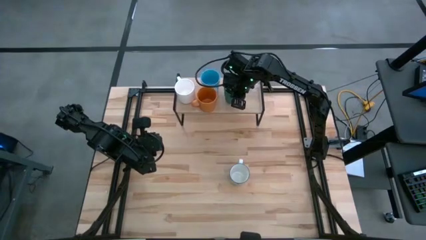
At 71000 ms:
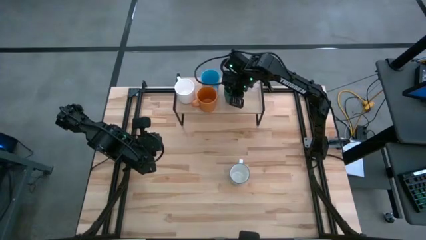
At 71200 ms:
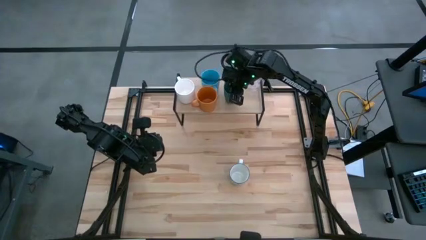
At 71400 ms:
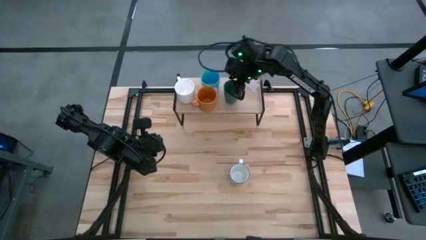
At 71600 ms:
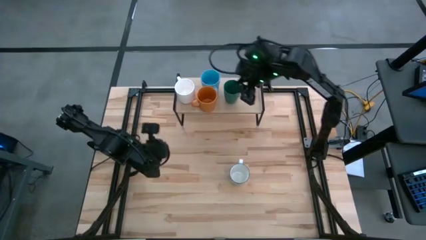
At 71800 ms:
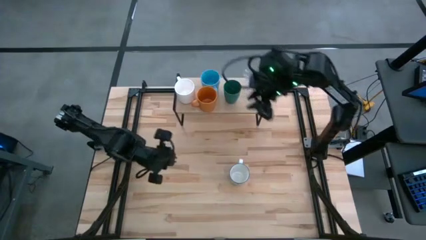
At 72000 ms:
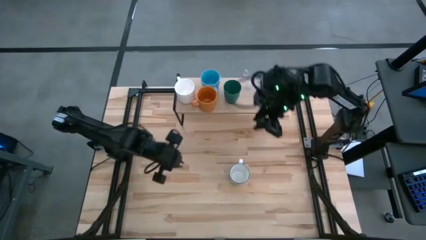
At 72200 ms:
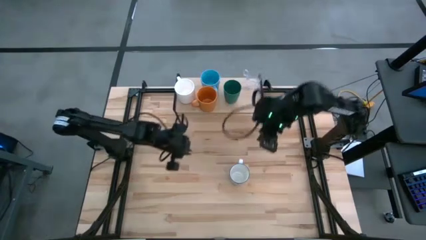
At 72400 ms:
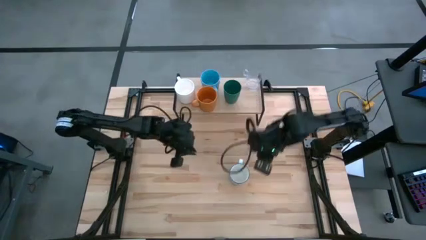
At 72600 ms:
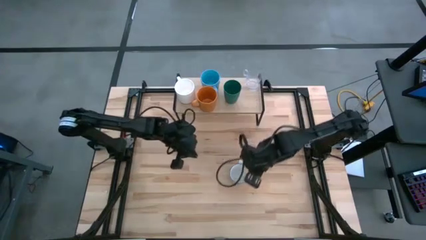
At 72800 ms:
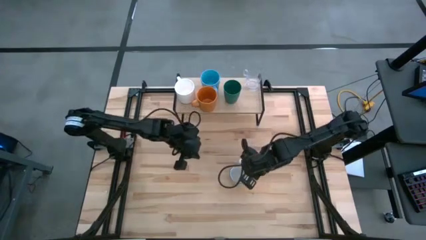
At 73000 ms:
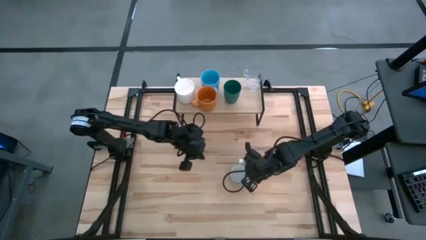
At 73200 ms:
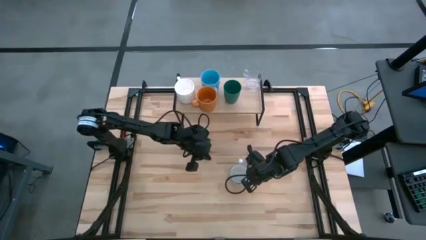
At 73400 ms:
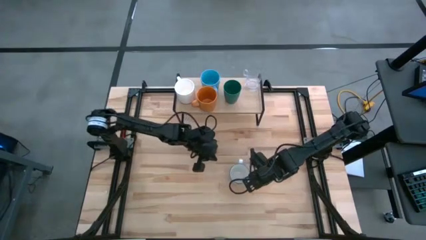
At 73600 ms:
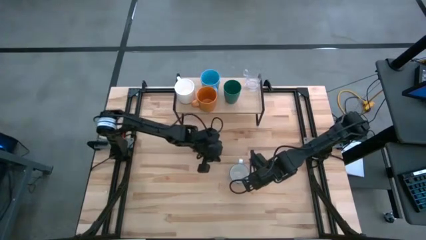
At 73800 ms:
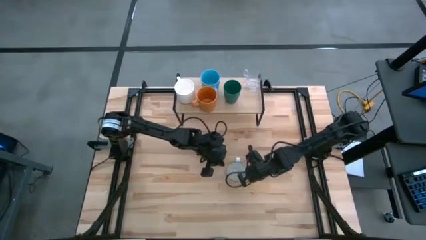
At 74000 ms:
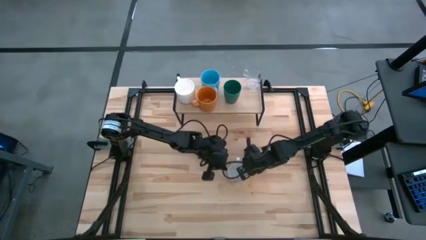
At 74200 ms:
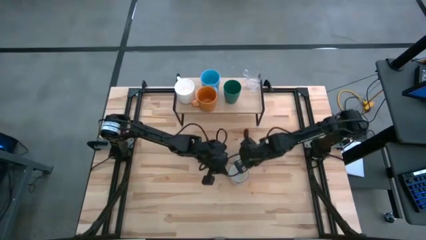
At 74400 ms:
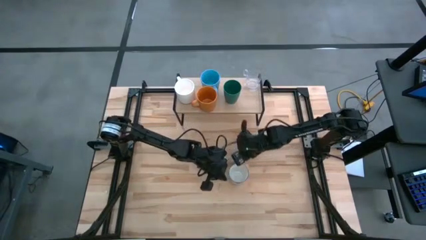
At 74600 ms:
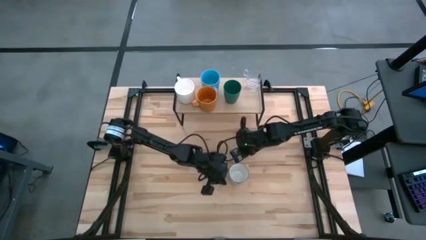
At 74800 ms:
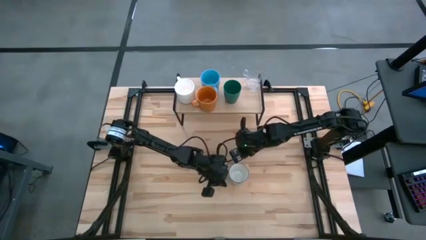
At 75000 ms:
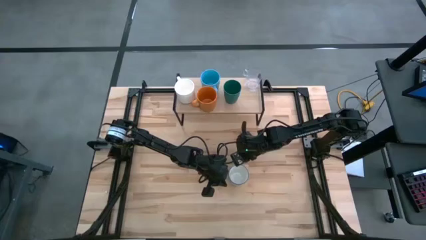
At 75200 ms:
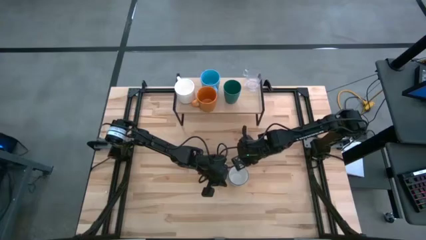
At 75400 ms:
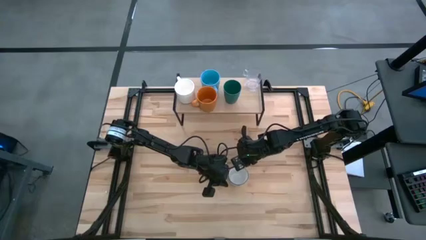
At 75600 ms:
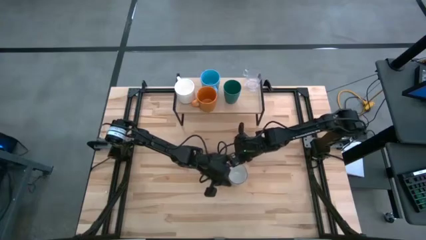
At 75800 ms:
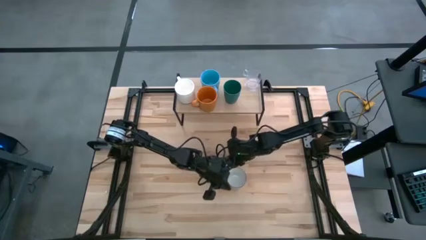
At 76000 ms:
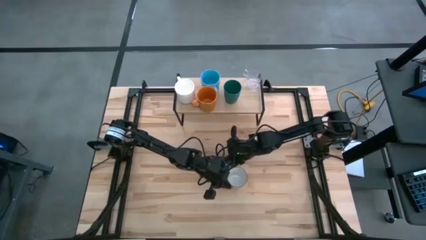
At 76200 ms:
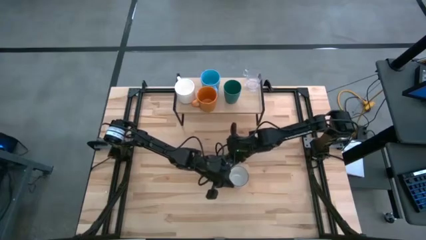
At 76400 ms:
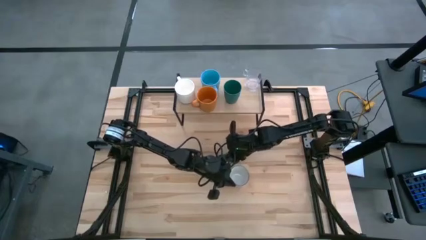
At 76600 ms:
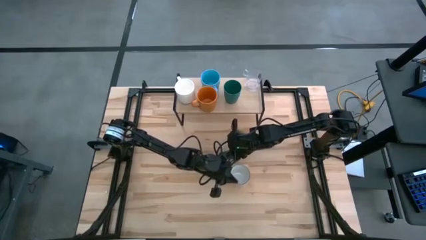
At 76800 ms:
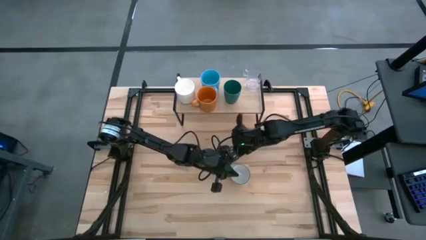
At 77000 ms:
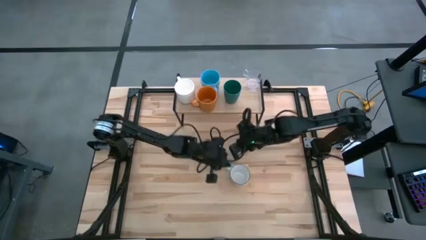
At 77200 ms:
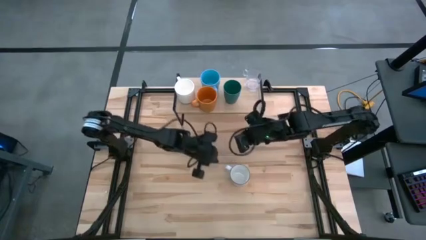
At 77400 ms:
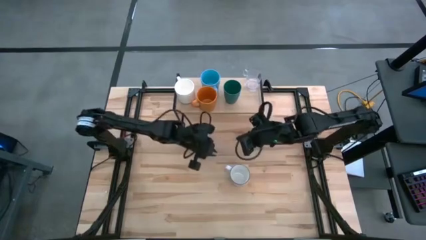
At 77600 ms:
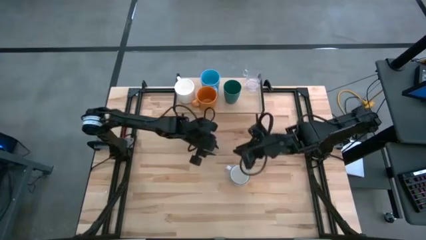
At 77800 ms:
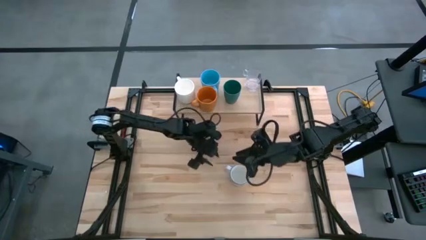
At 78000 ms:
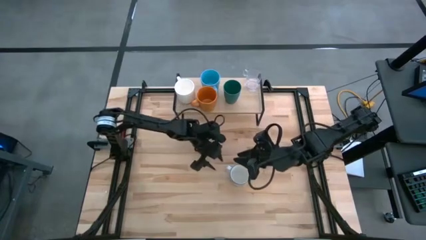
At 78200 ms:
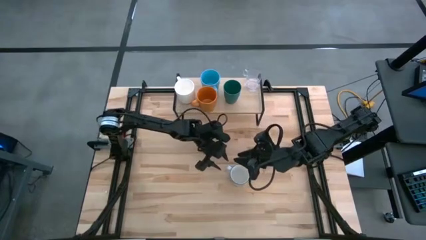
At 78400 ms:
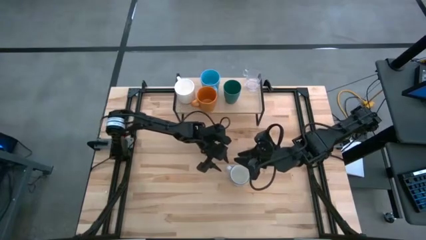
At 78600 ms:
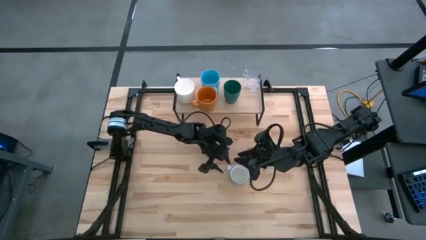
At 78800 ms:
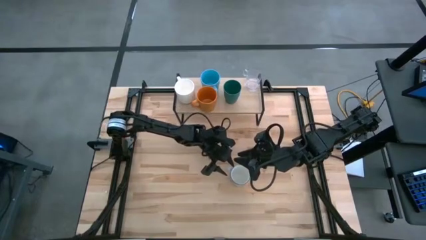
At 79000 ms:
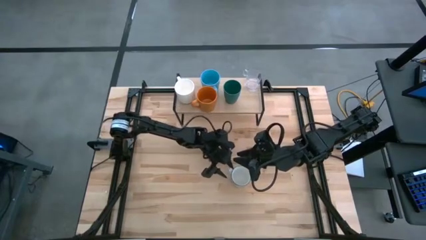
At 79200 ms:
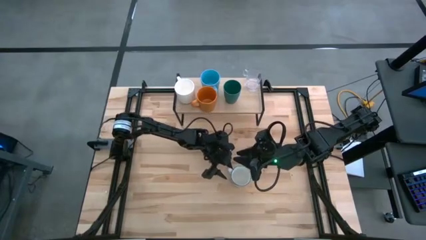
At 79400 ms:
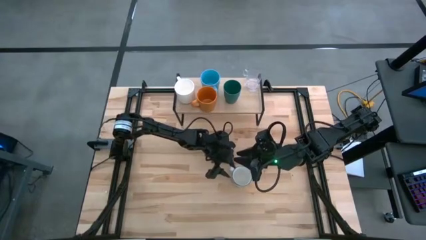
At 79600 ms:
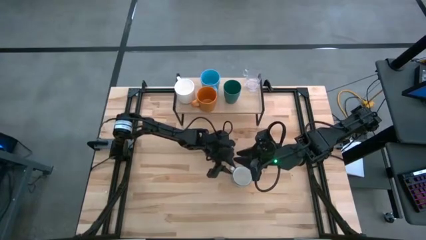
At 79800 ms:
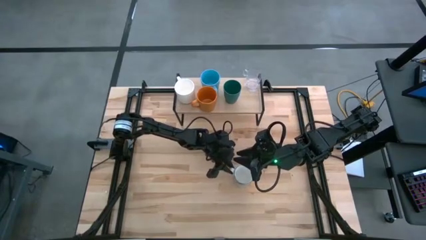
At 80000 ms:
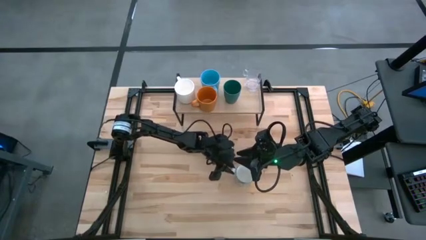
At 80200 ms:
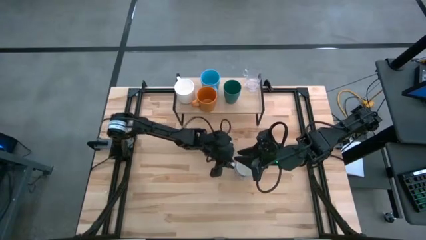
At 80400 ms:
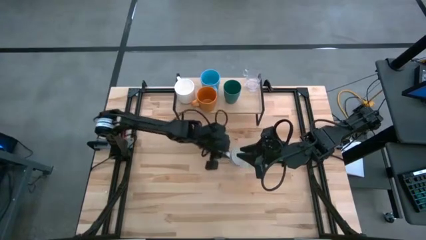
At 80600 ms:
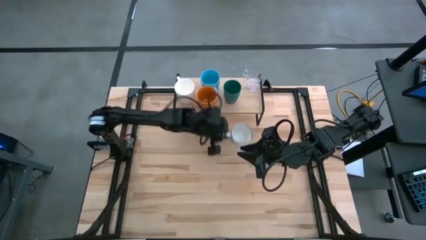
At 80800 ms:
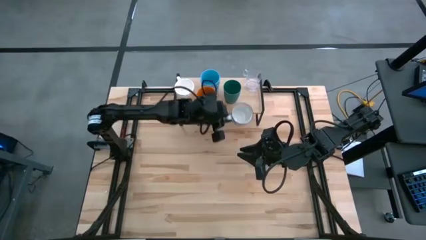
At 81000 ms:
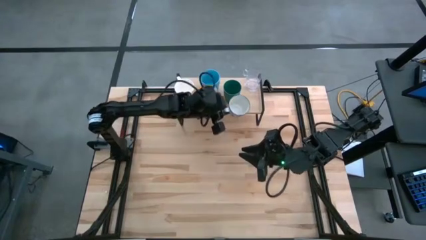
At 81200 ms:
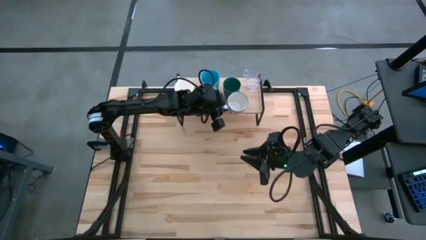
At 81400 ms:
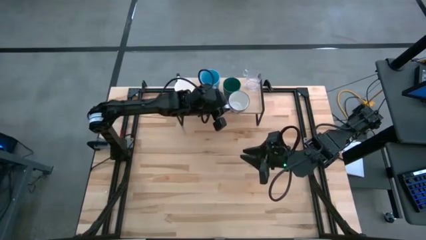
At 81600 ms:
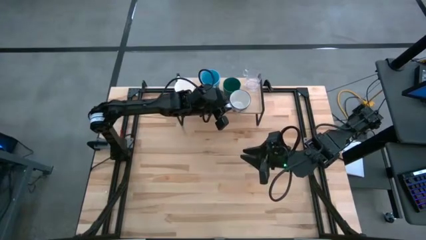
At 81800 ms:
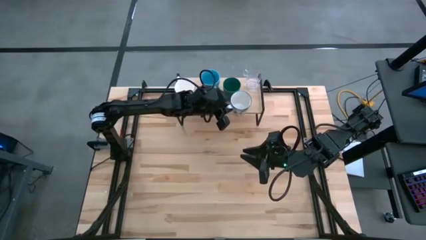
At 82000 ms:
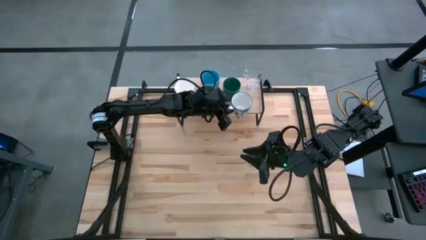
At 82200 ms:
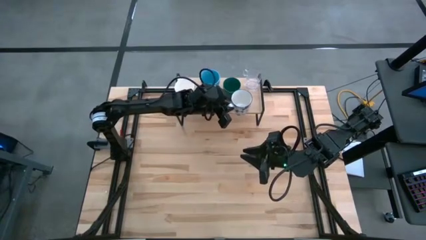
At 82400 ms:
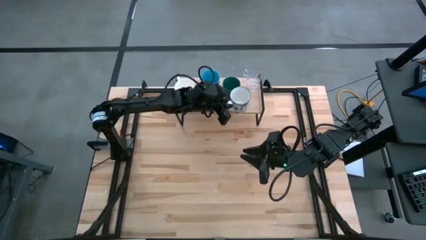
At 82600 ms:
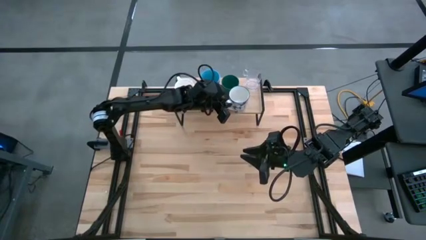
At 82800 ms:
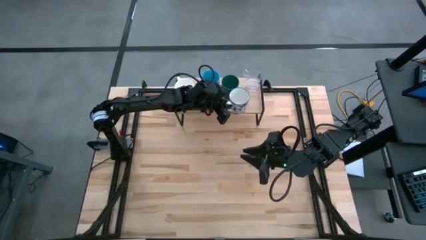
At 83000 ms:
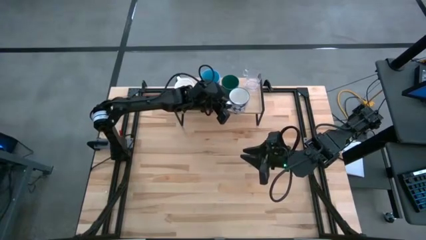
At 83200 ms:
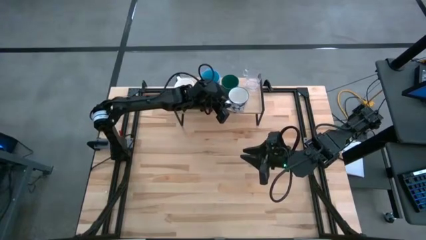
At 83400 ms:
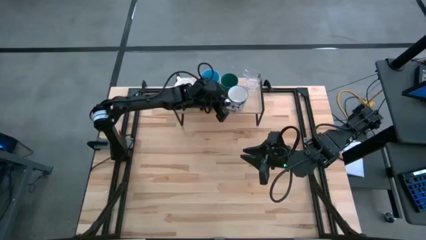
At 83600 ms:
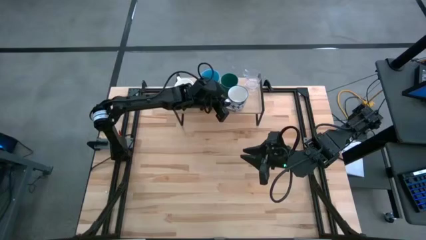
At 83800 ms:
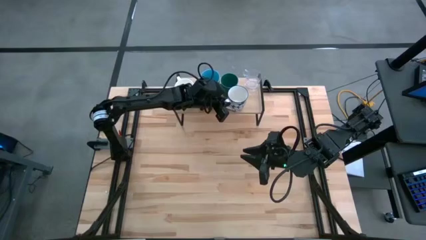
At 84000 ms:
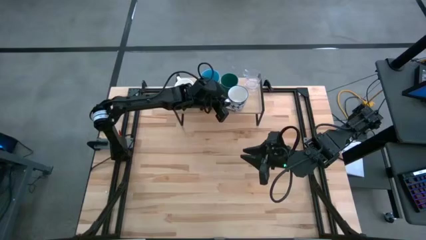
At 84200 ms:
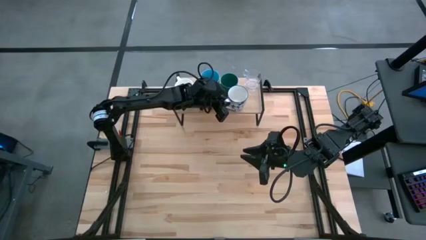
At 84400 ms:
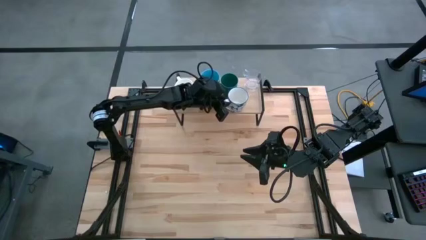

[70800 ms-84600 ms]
Task: Stack small to large cups/mugs on shelf
Put the white patterned mug on the shelf

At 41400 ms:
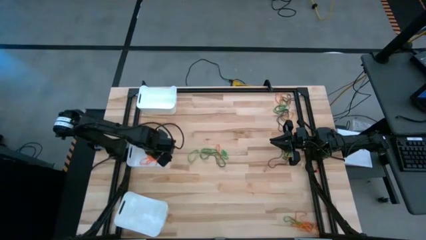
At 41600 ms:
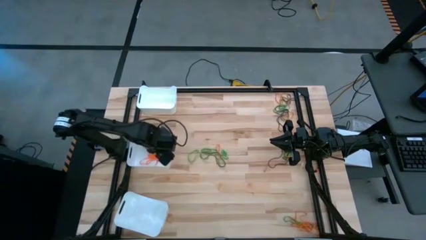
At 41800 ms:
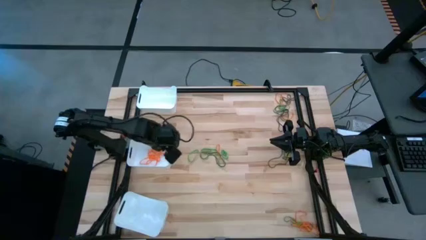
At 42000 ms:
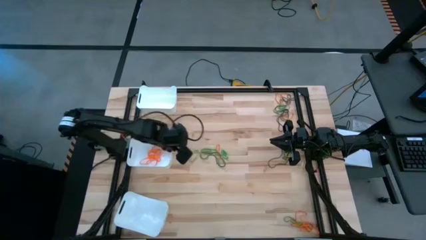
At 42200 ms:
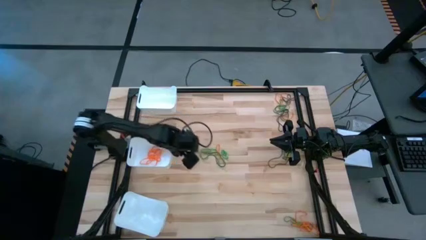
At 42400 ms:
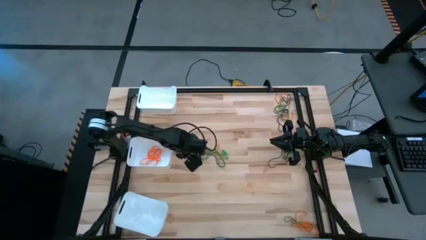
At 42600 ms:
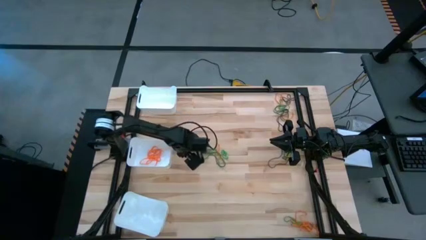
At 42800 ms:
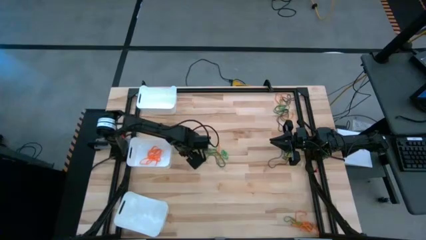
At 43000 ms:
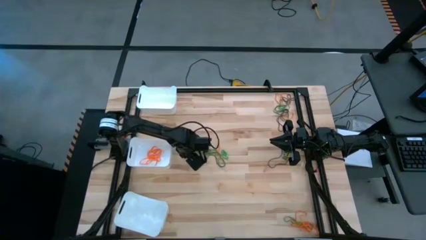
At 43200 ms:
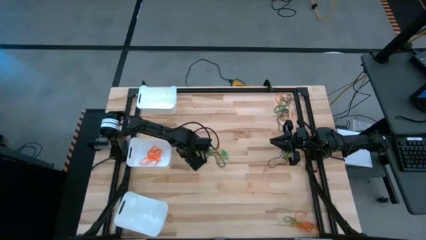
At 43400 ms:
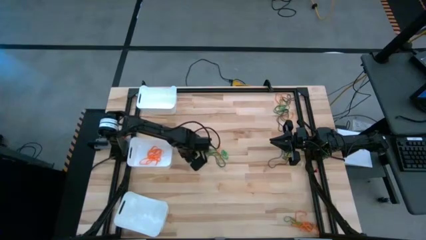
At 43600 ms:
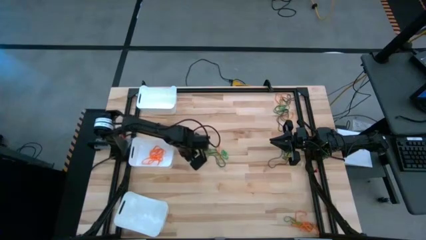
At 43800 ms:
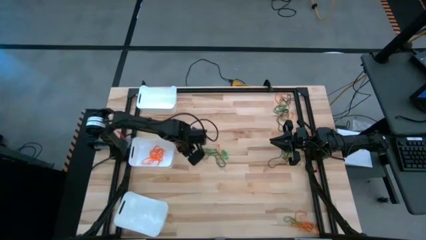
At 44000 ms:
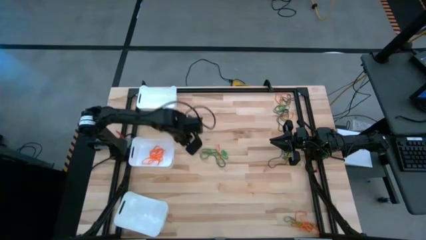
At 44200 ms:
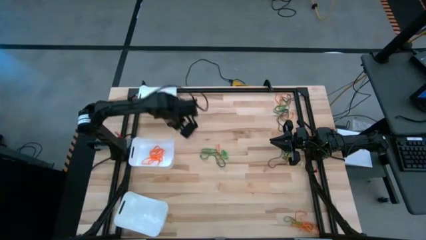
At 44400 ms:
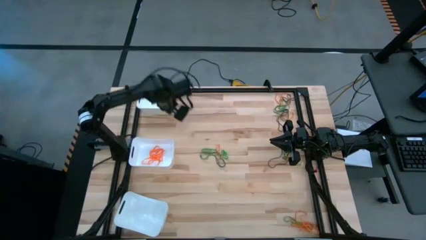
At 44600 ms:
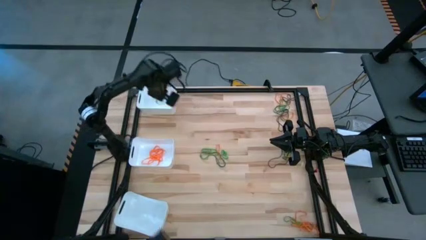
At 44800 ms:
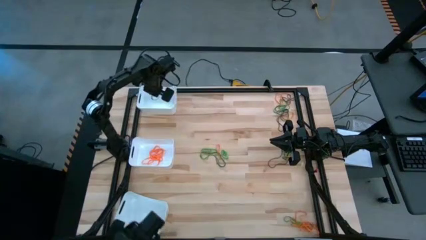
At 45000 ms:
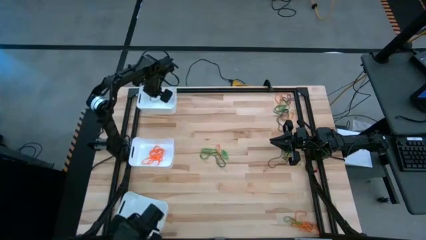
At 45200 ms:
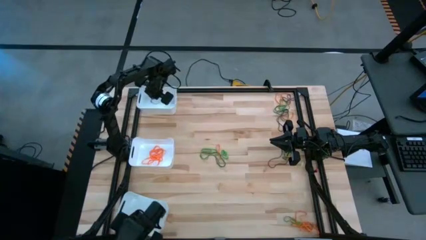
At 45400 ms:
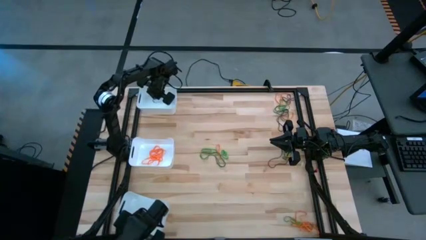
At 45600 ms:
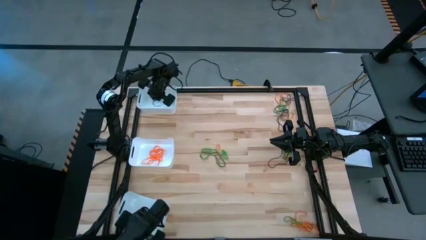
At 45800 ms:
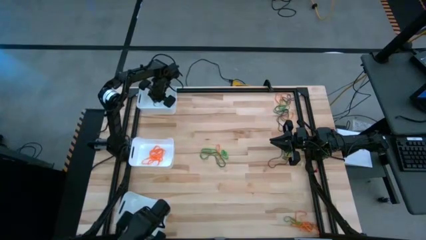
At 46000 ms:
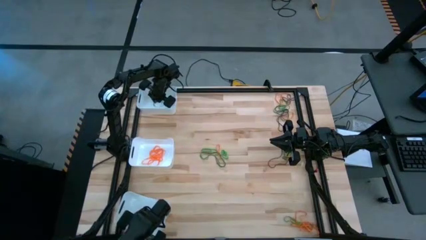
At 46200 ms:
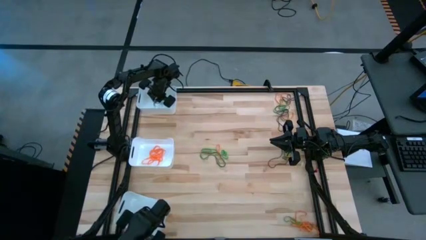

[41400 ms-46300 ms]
Task: Sort rubber bands into baskets
Put the green rubber band into the top white bin
